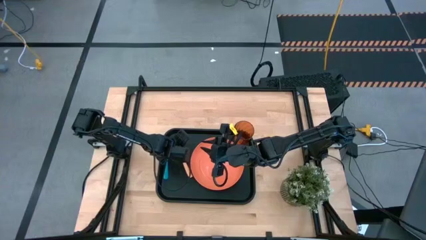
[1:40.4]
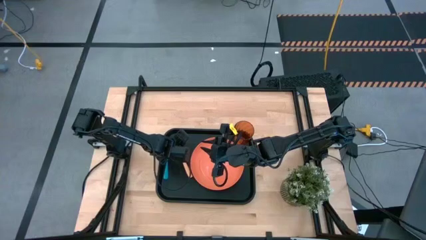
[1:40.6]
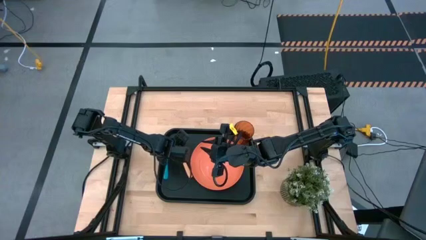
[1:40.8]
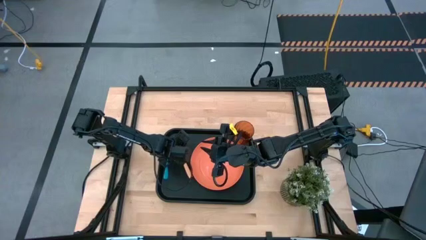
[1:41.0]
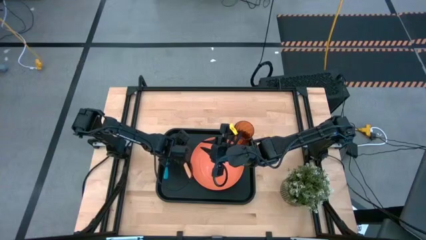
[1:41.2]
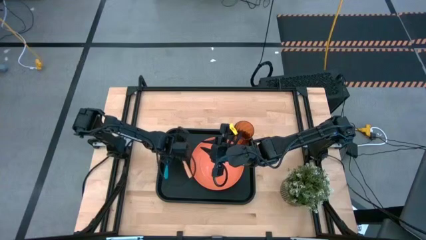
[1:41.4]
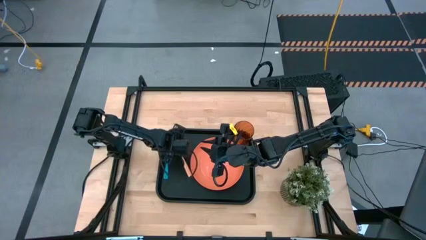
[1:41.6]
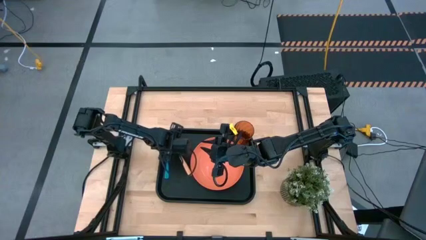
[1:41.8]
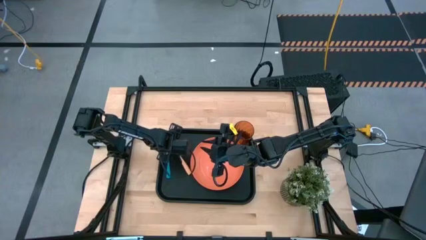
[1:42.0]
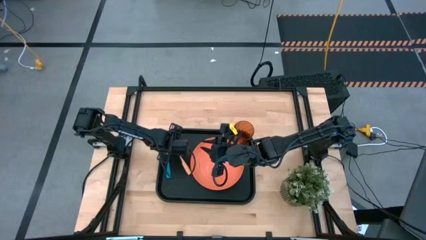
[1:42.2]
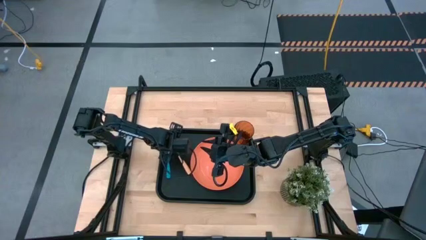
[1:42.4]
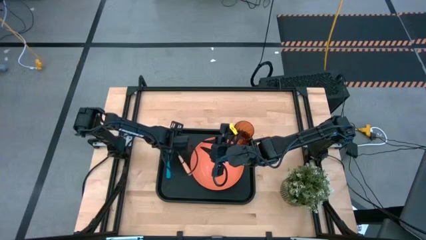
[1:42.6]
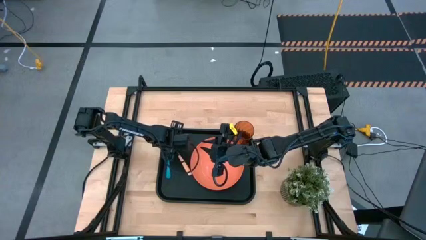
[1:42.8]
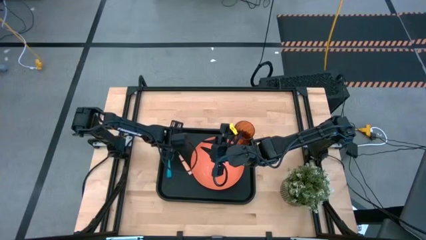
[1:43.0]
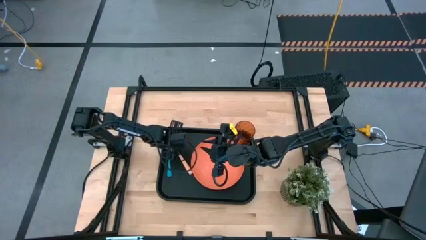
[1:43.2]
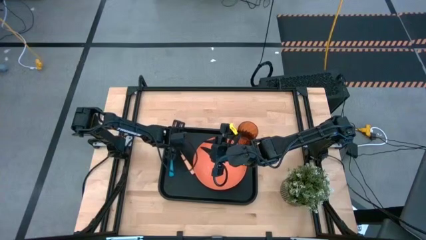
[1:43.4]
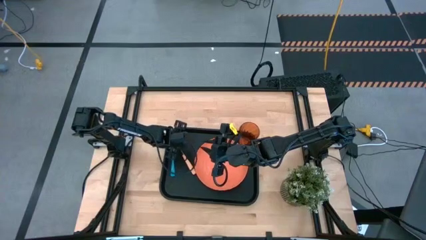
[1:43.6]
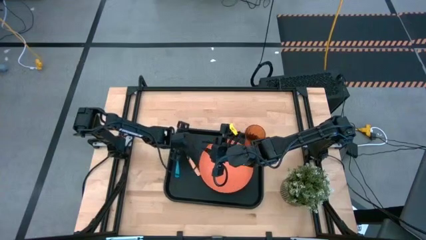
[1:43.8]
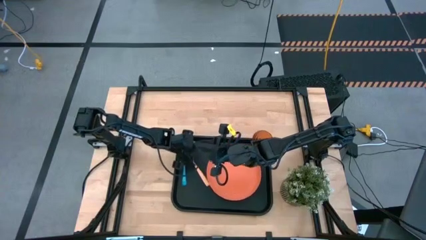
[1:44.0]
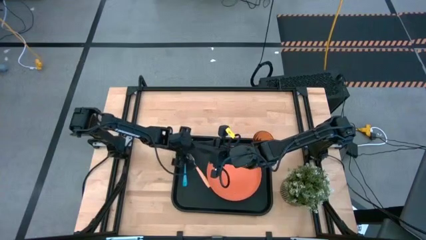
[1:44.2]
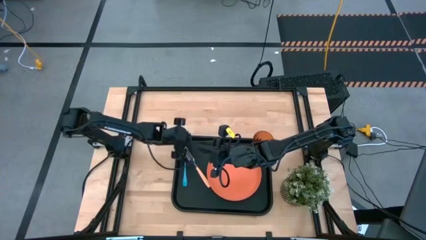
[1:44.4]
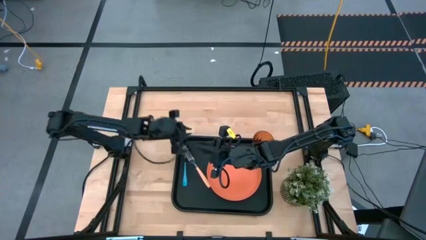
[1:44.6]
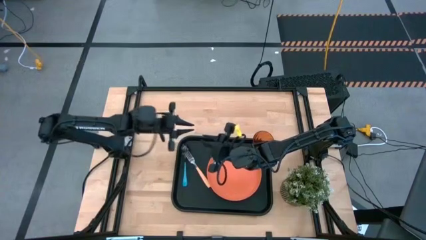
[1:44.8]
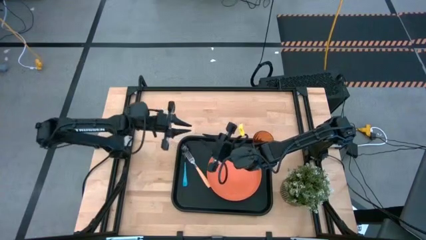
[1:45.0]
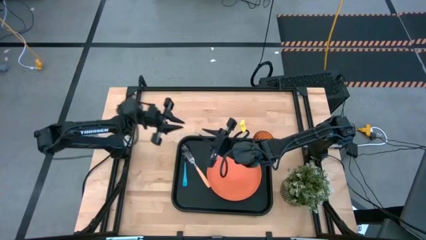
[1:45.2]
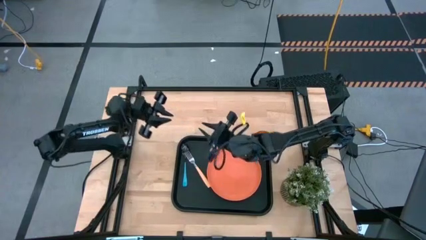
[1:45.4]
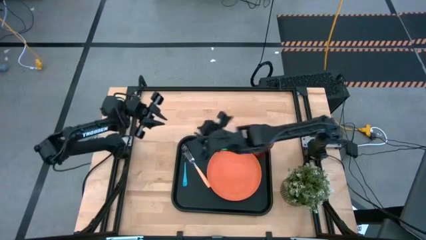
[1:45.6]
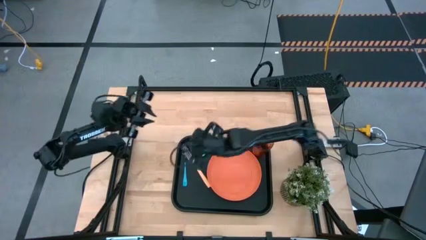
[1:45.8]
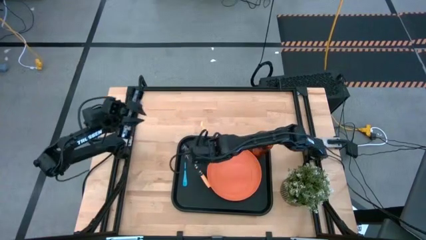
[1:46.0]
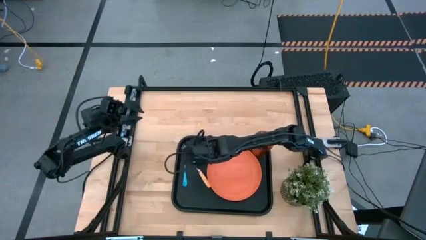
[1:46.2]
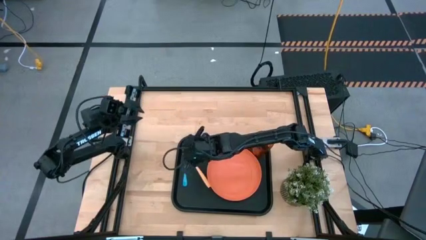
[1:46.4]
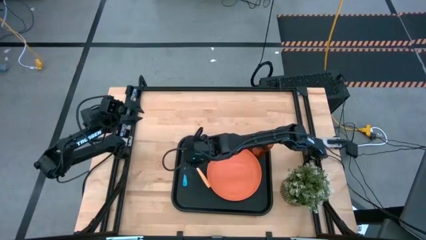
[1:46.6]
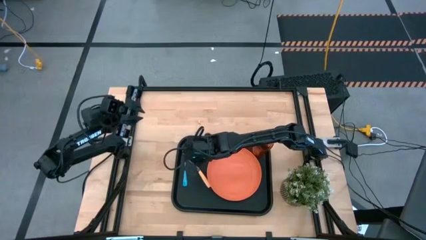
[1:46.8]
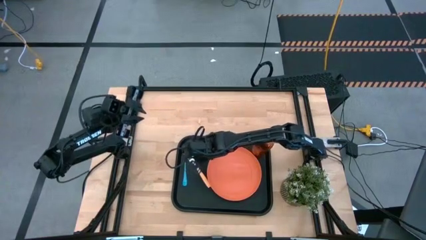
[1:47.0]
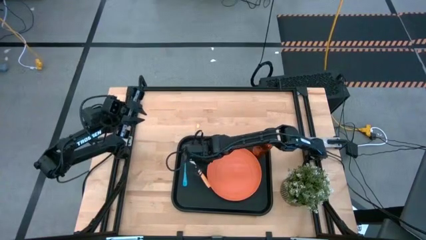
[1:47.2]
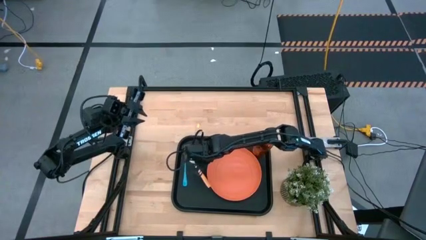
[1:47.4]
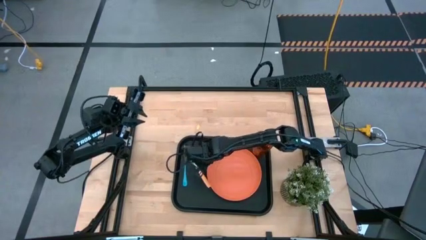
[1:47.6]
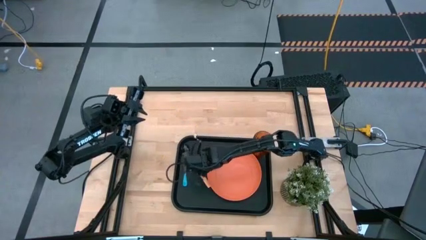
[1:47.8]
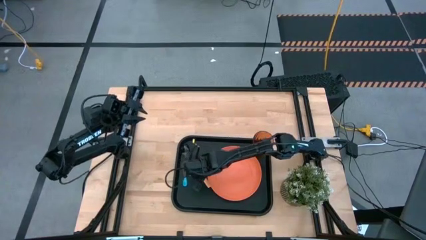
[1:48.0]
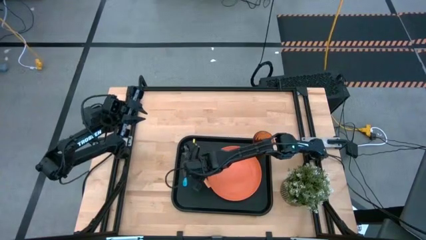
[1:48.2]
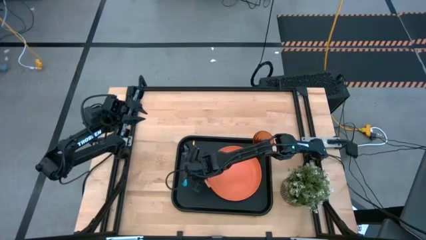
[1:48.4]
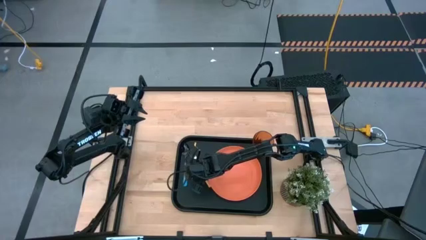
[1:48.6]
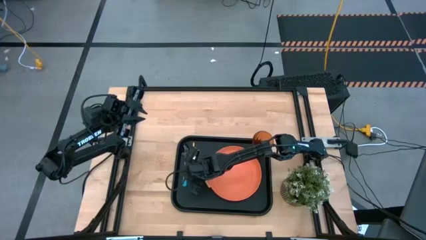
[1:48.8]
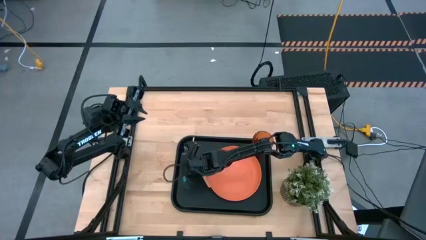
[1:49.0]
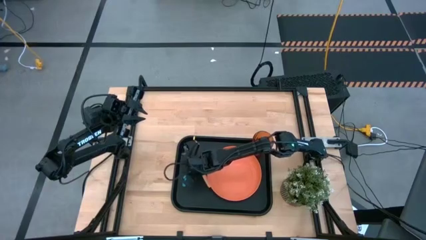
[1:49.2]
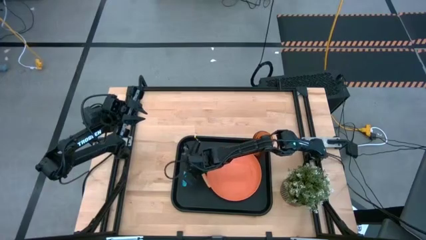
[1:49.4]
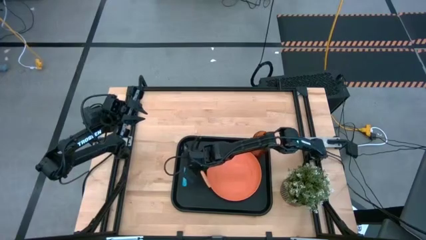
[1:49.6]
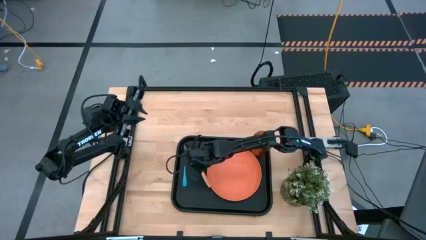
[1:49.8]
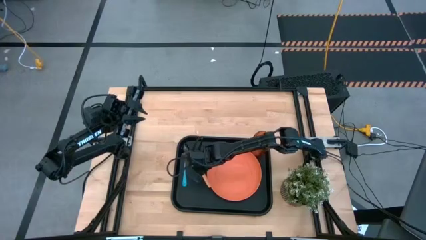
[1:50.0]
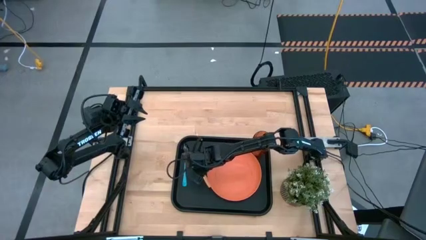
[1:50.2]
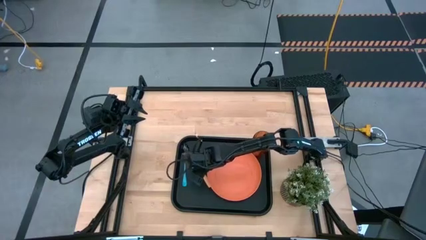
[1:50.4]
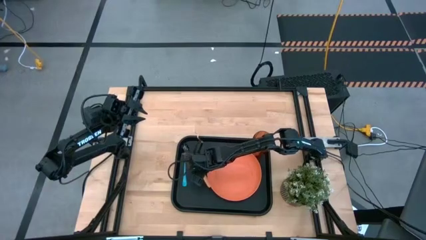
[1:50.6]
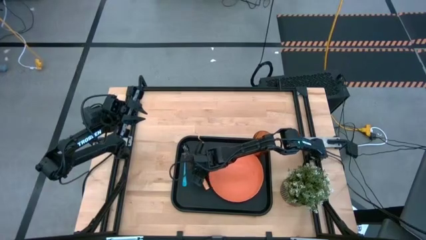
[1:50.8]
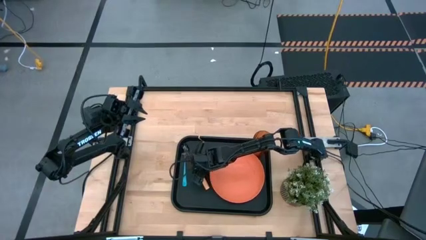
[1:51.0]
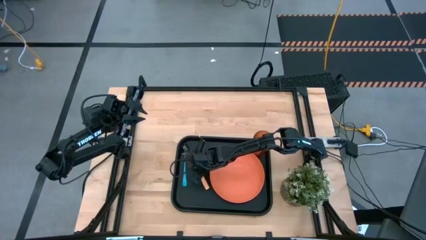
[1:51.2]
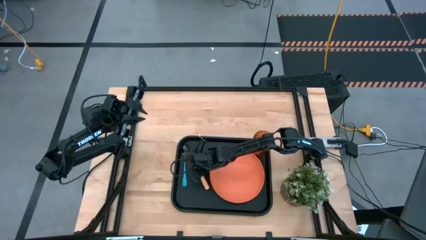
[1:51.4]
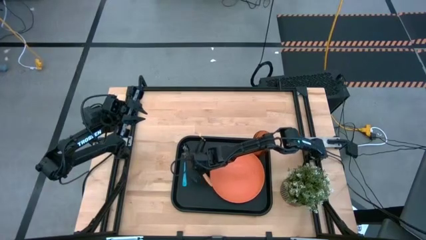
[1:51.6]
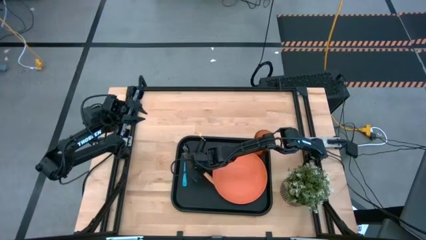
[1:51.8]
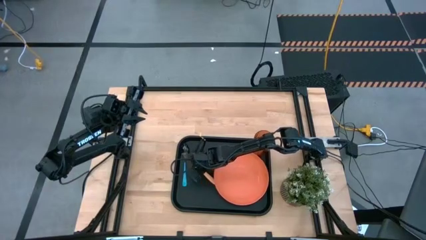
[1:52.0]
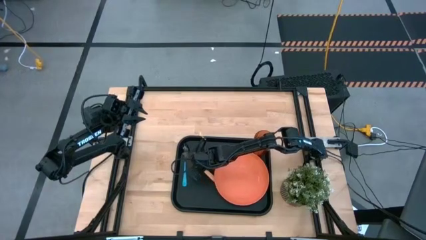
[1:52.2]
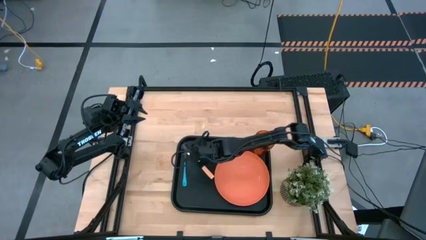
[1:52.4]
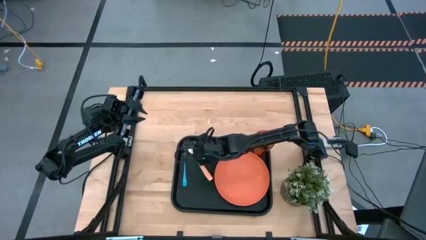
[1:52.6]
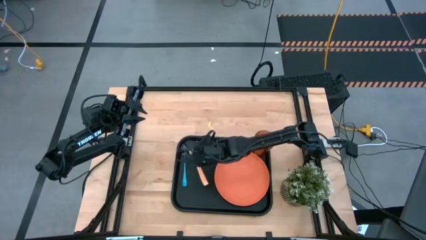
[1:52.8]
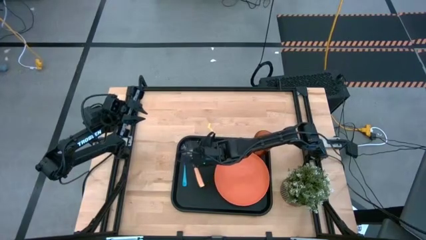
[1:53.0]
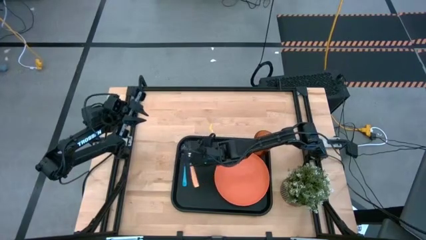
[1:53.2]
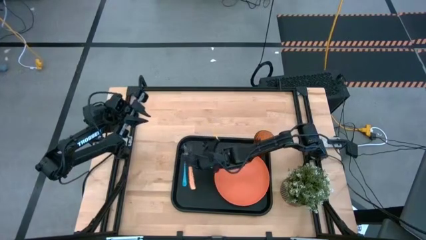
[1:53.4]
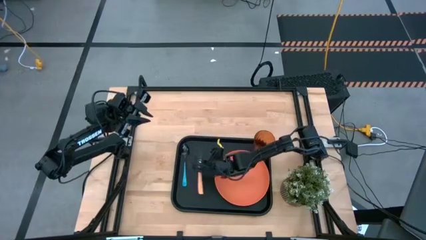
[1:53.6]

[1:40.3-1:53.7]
Task: Pick and place plate/cup/fork/spoon on tray
Put the pink fork on the black serving tray
